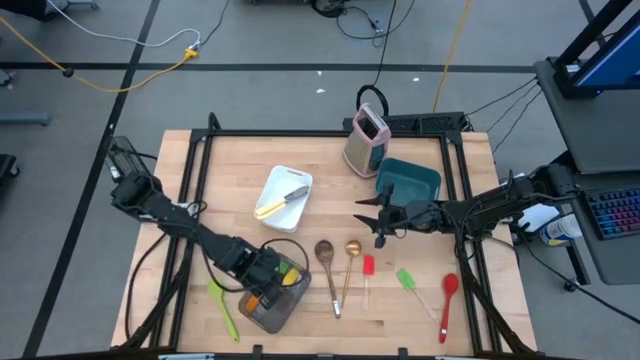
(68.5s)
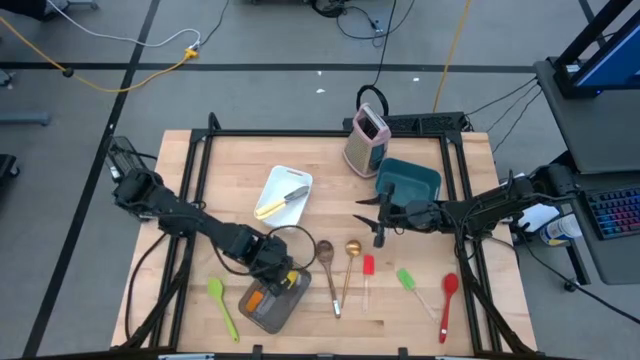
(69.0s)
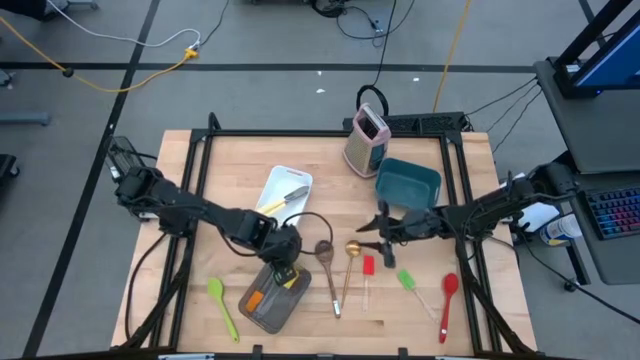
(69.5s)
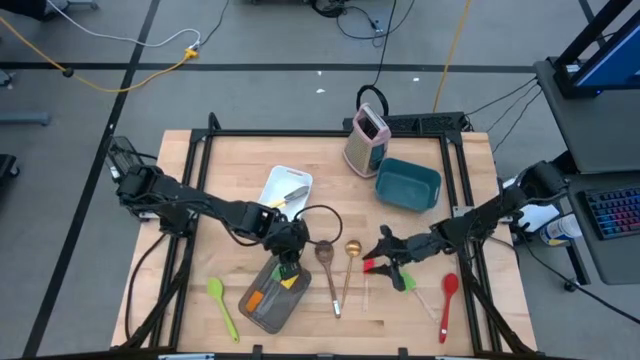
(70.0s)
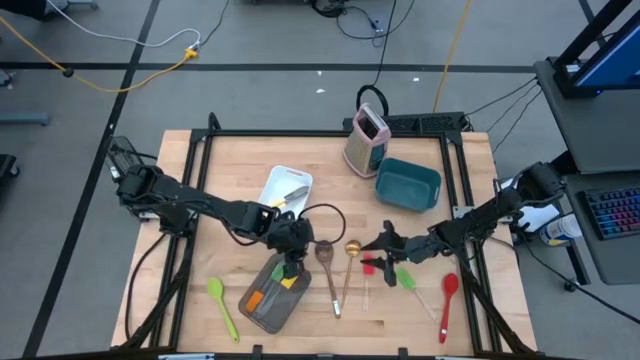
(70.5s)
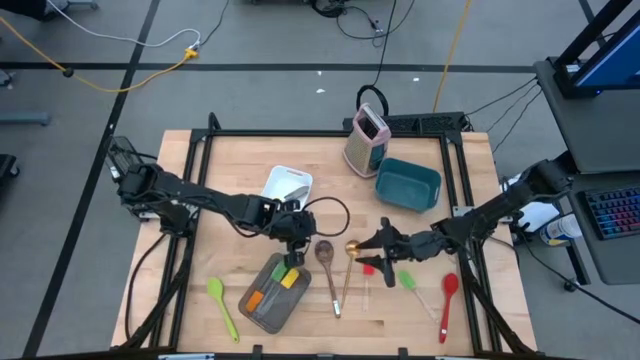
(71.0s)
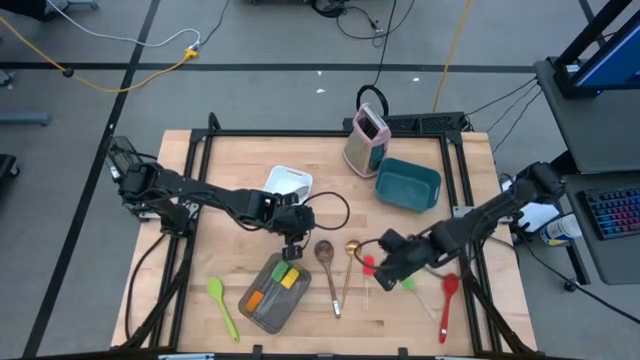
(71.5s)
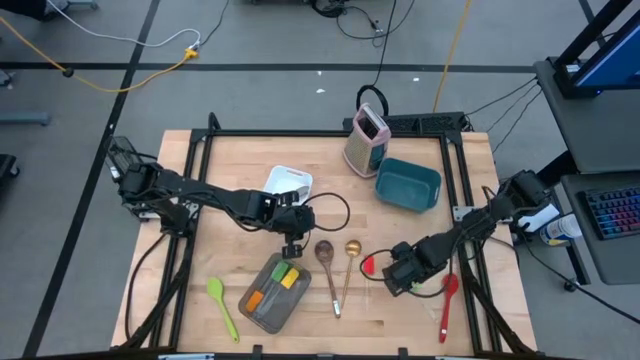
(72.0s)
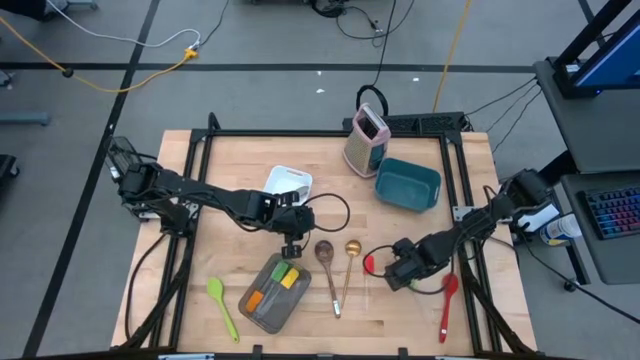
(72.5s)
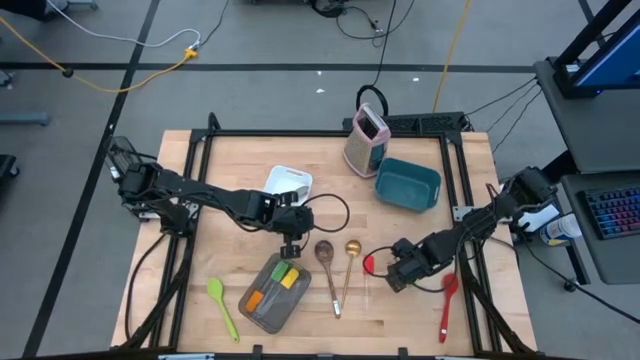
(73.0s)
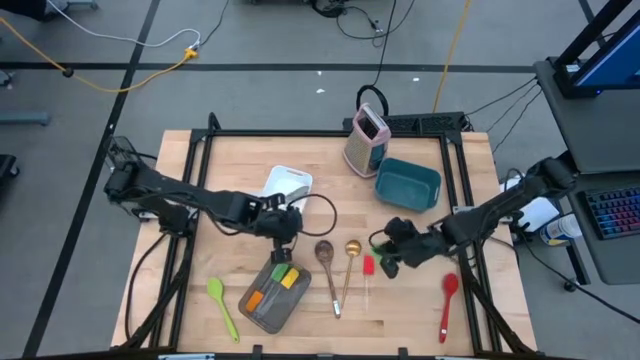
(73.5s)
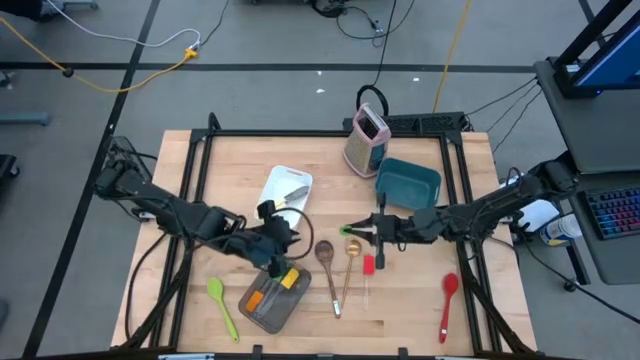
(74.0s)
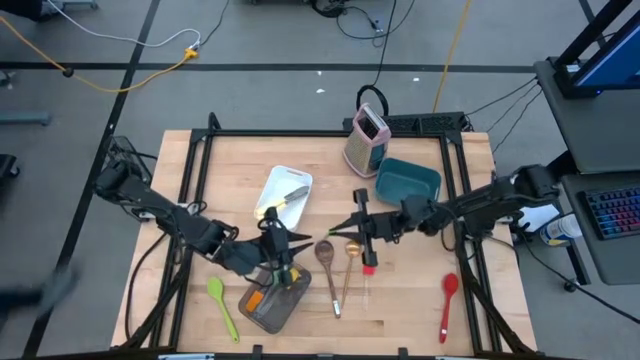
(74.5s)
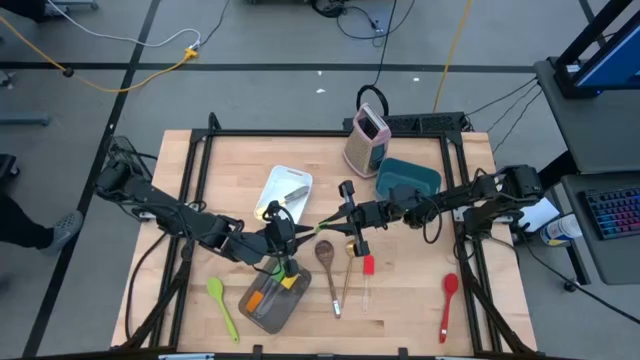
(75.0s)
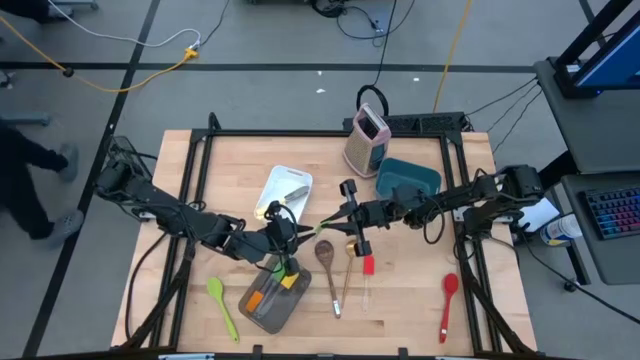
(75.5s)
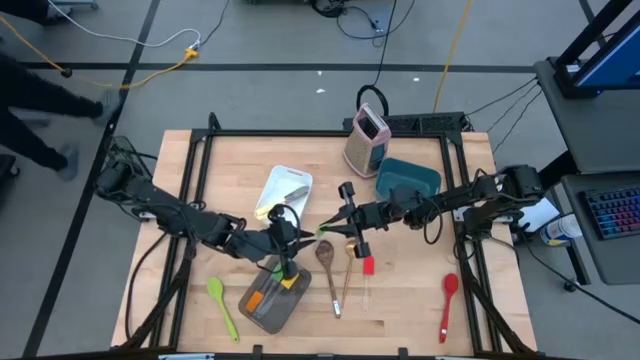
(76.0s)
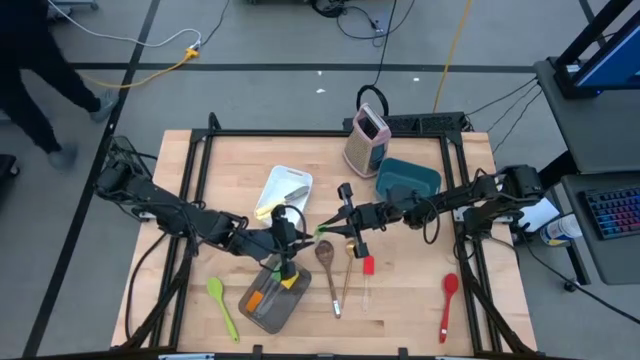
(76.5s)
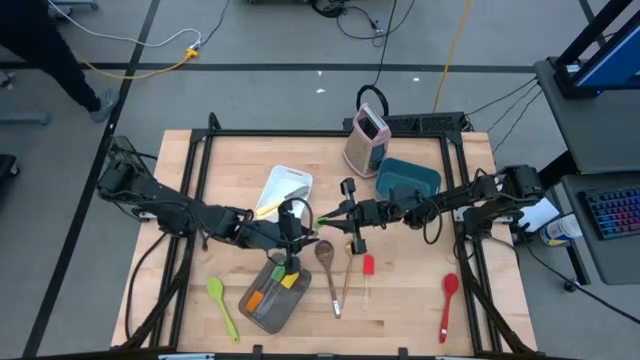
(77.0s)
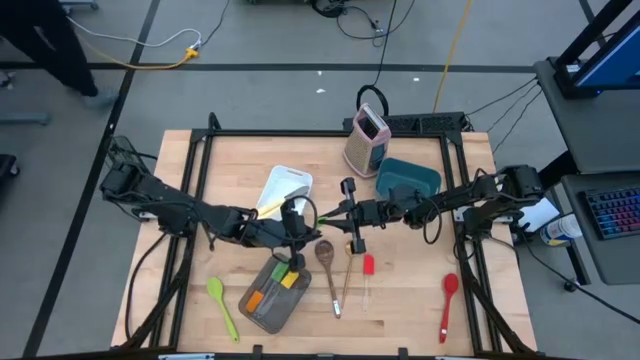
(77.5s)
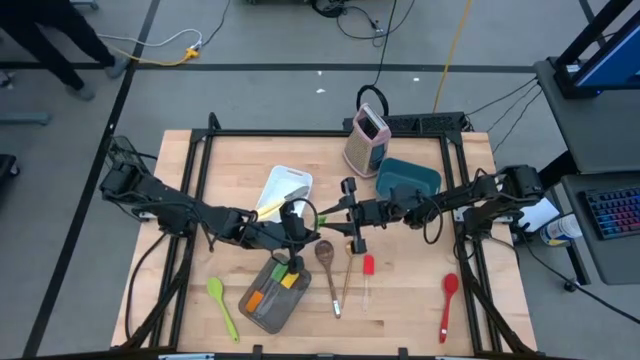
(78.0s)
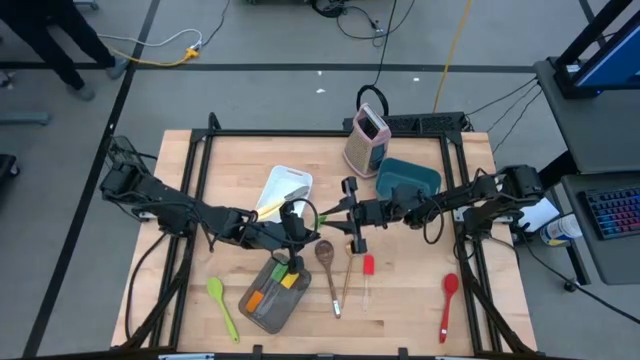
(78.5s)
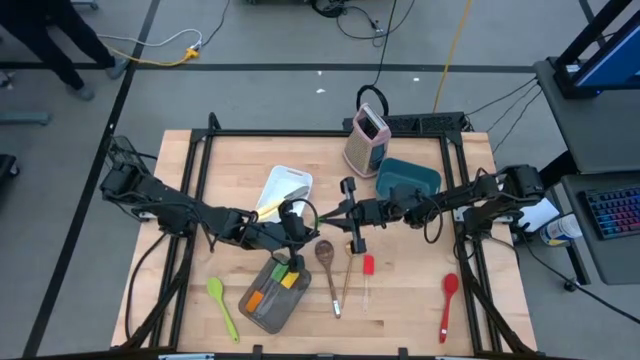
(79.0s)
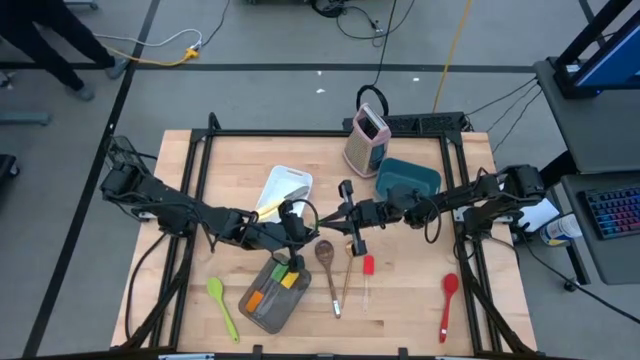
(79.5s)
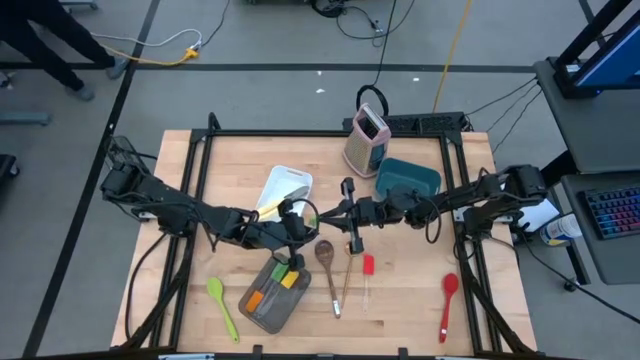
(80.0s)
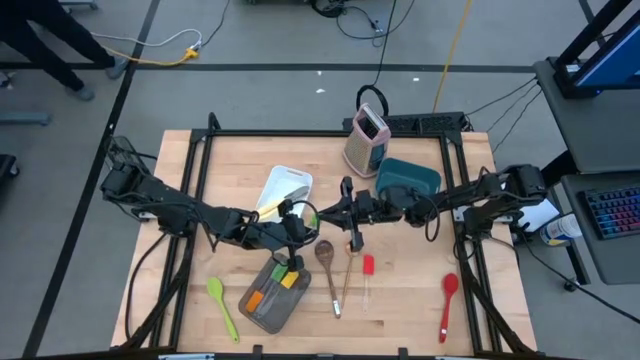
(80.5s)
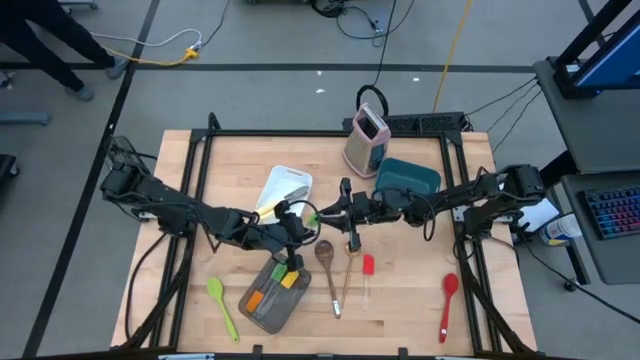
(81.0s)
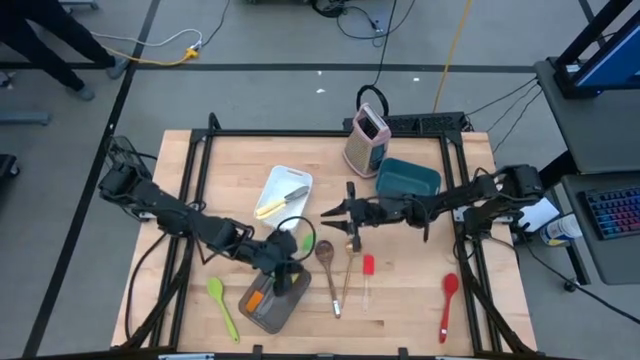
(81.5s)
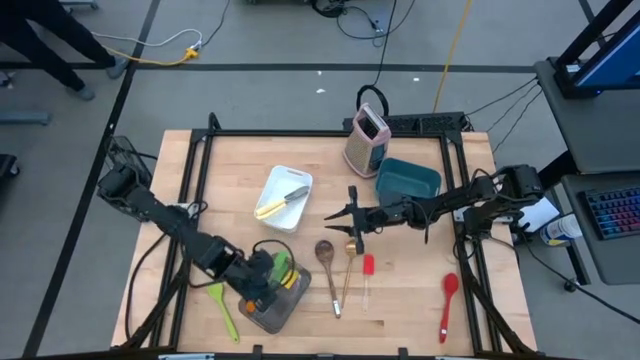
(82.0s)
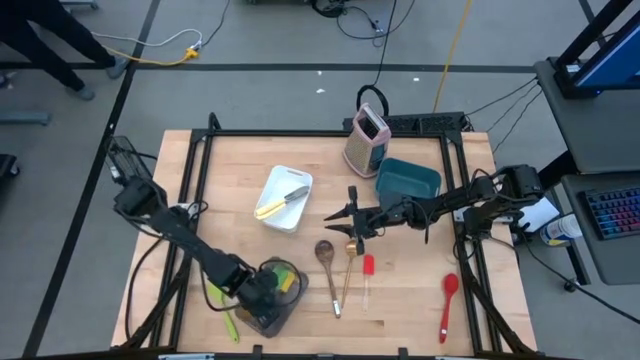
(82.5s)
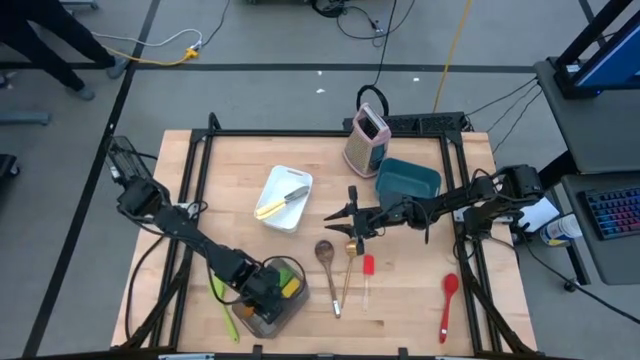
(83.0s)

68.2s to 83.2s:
Task: Pick & Place Kitchen Items
Put the green spatula into the black bin

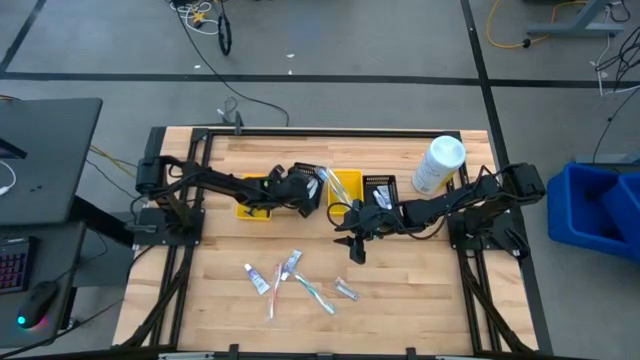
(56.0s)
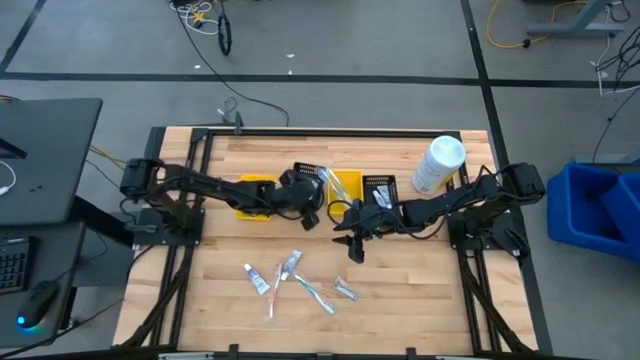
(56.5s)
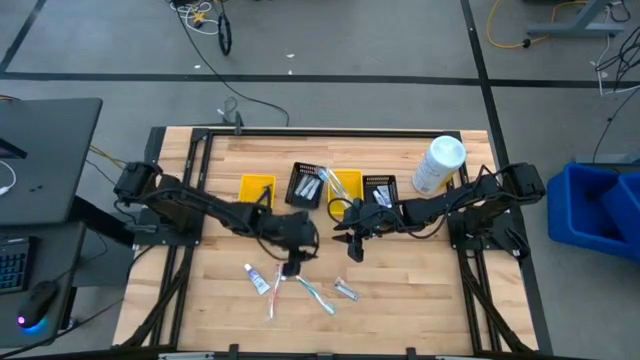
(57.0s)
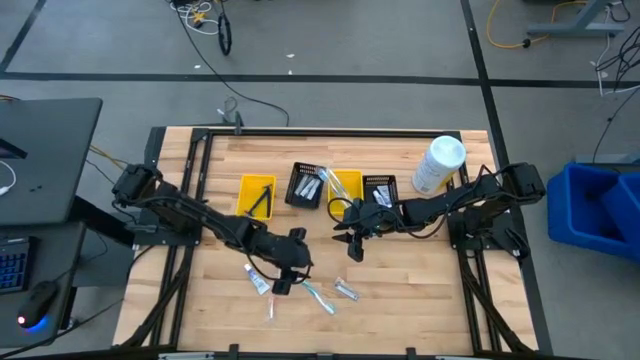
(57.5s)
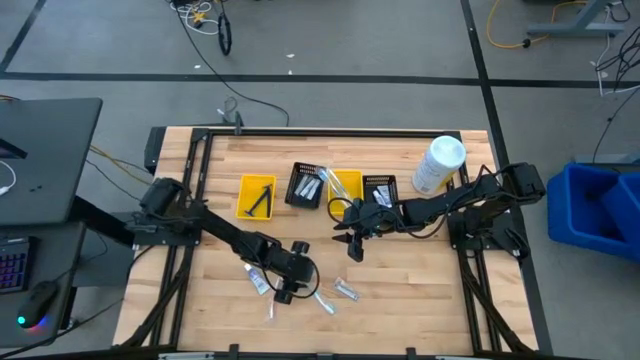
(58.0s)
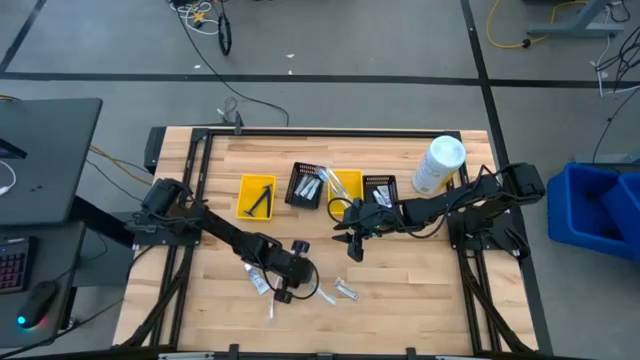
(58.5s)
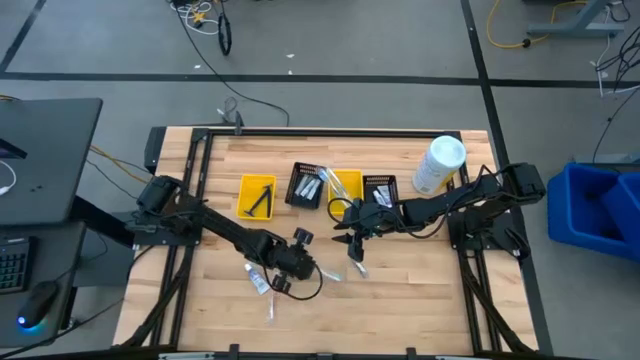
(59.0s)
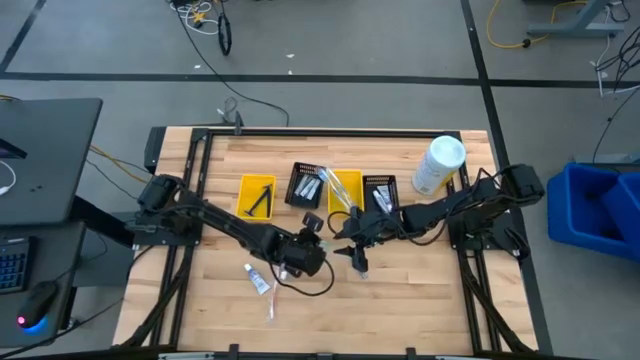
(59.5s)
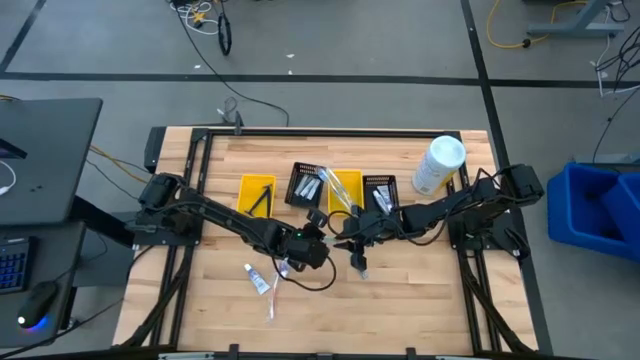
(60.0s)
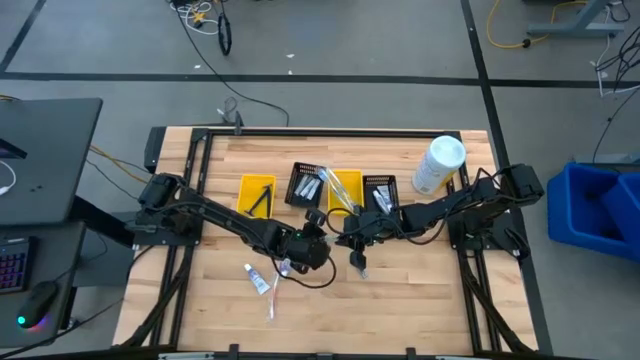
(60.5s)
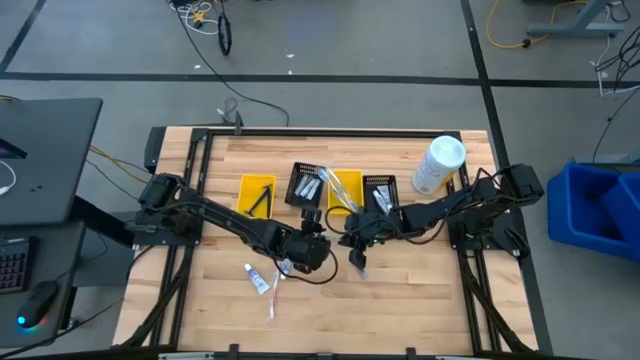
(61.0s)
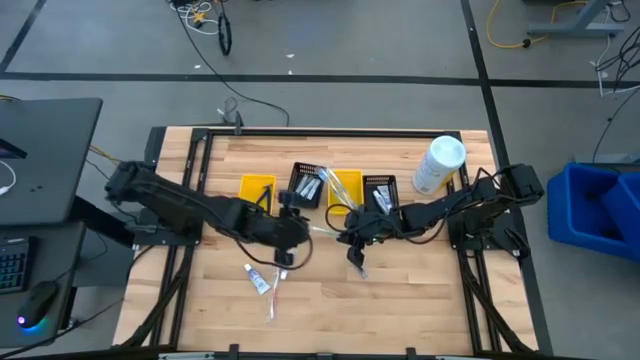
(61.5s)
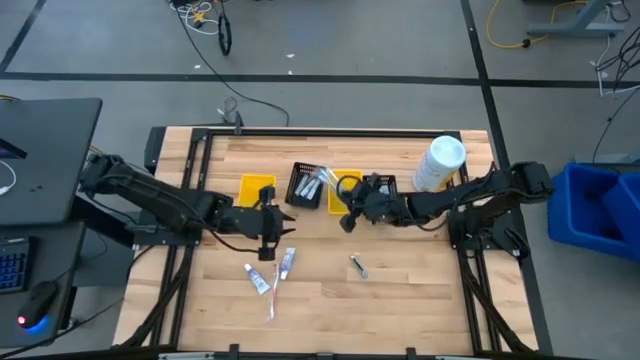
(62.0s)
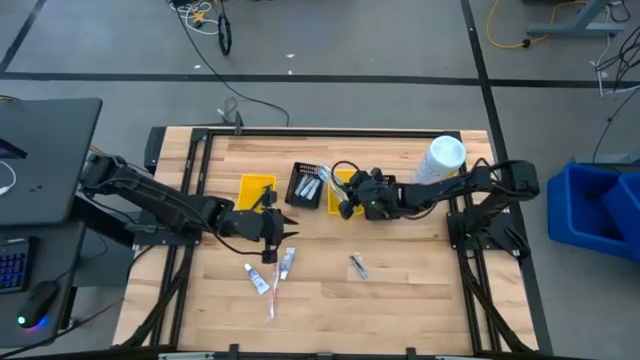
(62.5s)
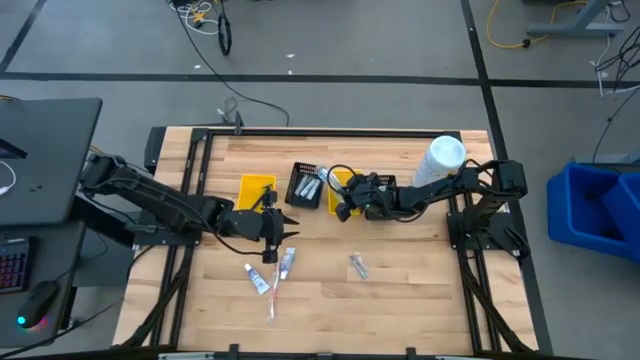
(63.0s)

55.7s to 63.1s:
Task: Pick & Place Travel size toiletries
Put the green toothbrush into the right yellow bin
